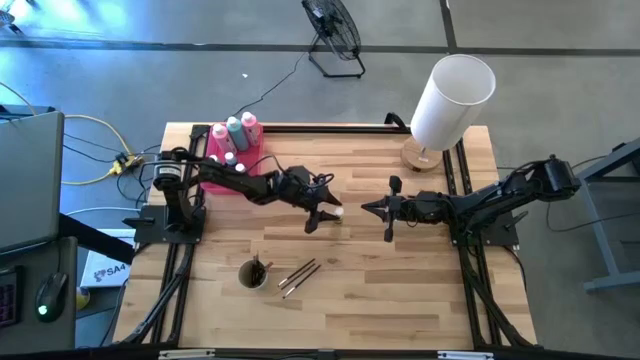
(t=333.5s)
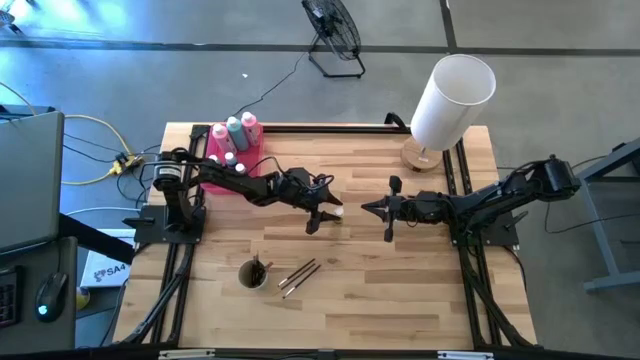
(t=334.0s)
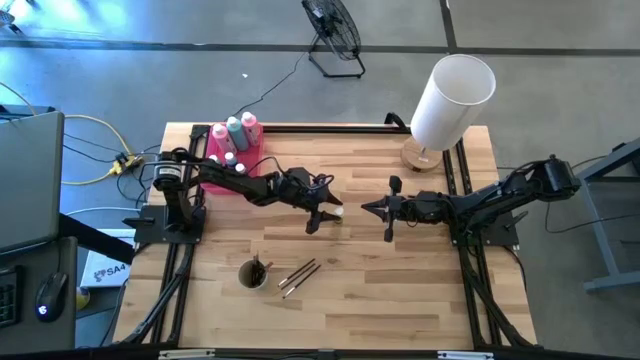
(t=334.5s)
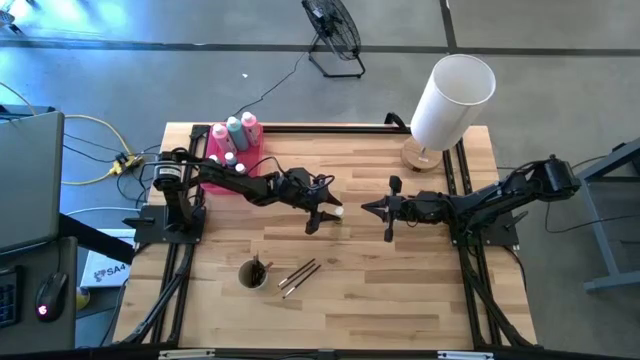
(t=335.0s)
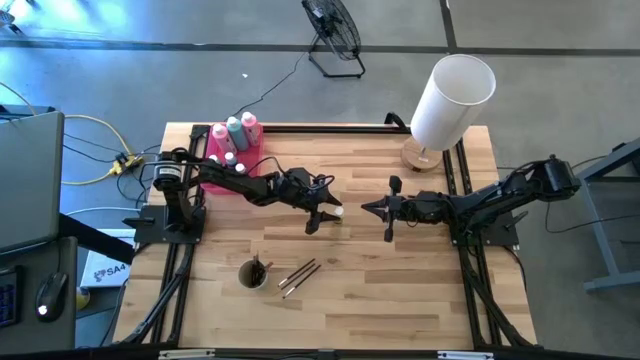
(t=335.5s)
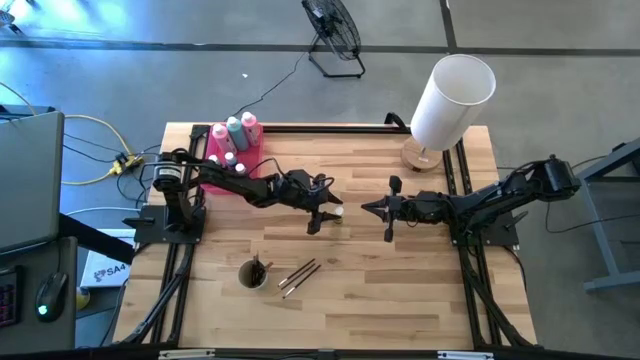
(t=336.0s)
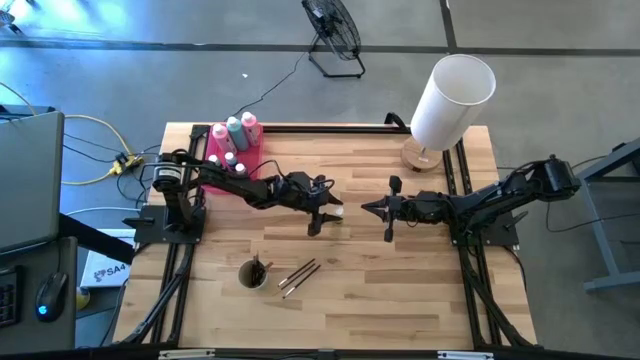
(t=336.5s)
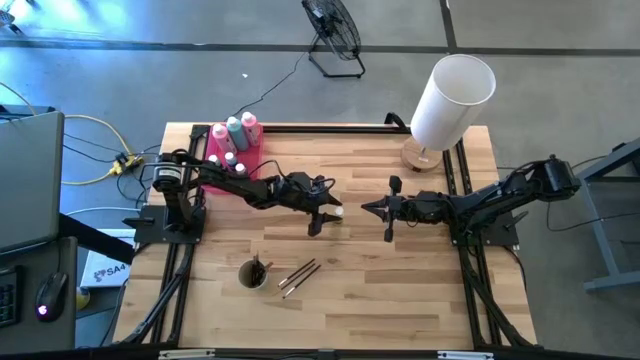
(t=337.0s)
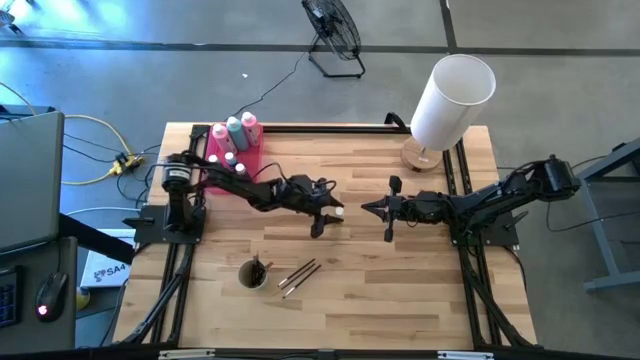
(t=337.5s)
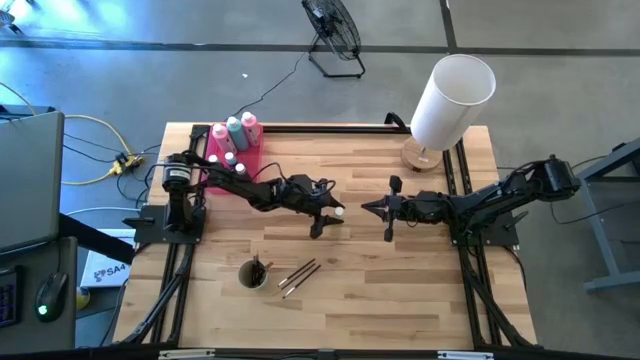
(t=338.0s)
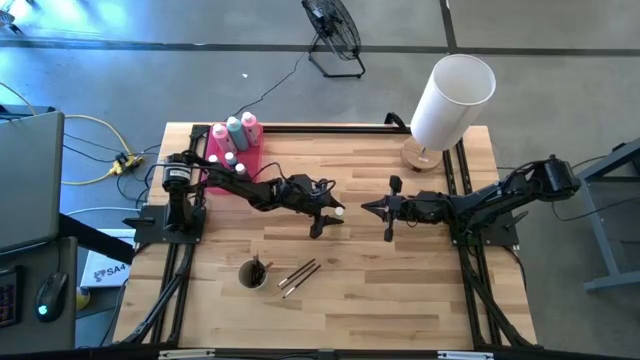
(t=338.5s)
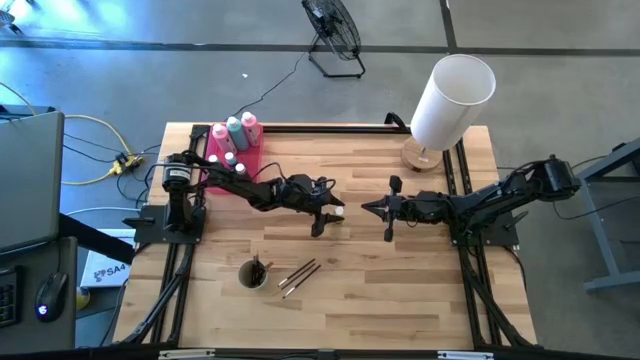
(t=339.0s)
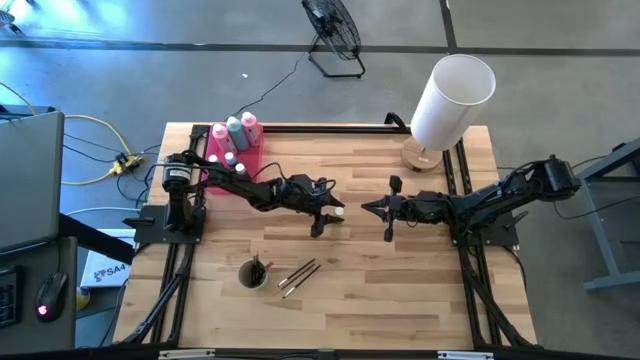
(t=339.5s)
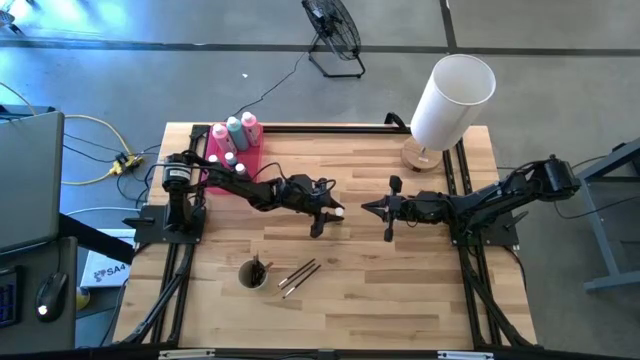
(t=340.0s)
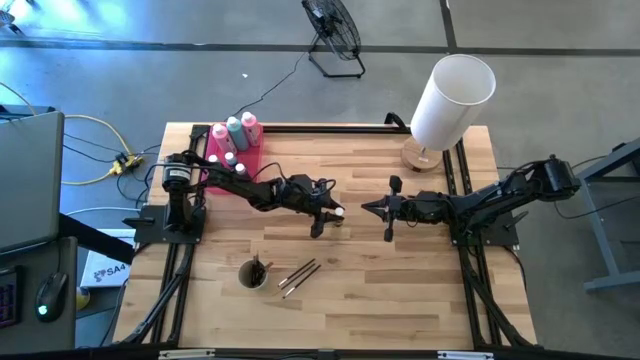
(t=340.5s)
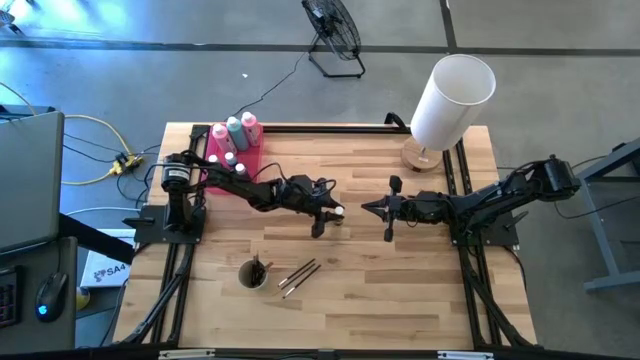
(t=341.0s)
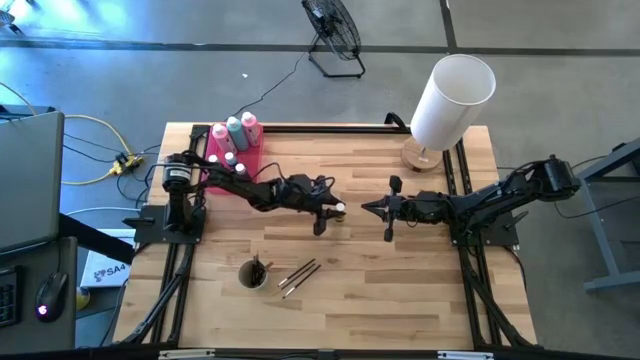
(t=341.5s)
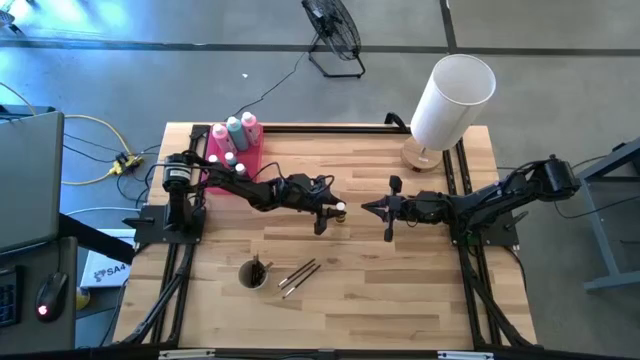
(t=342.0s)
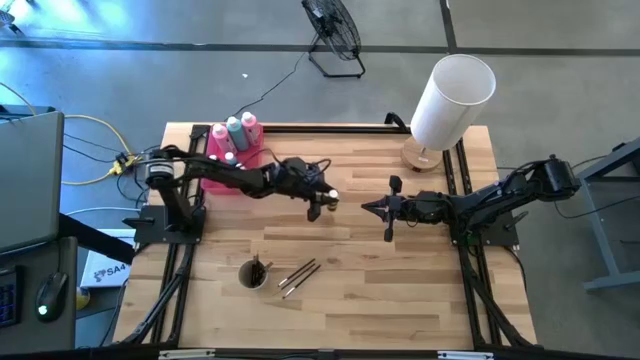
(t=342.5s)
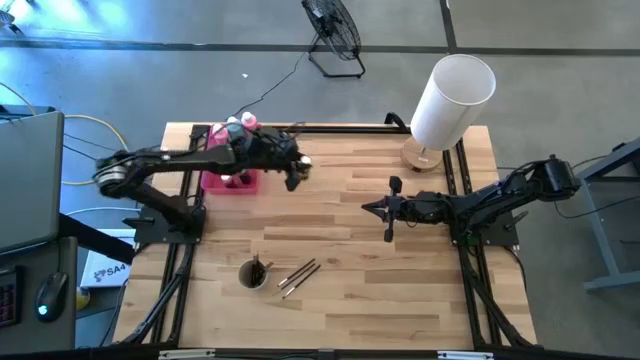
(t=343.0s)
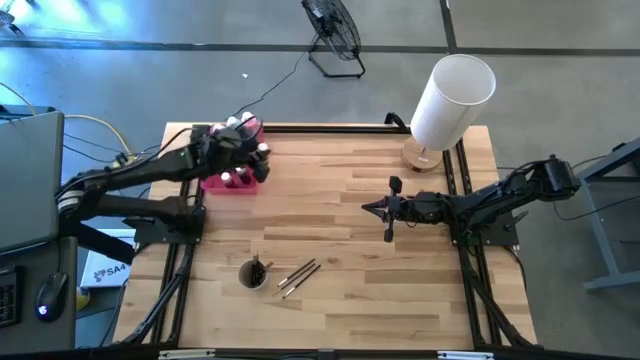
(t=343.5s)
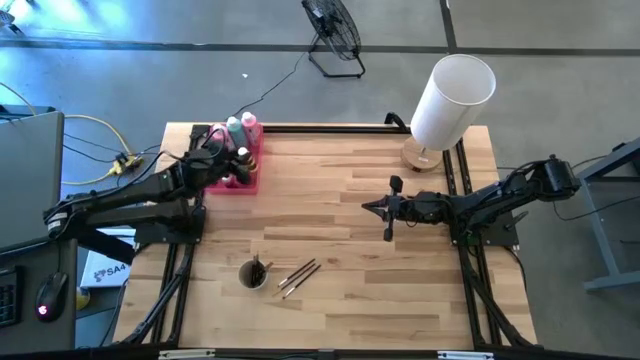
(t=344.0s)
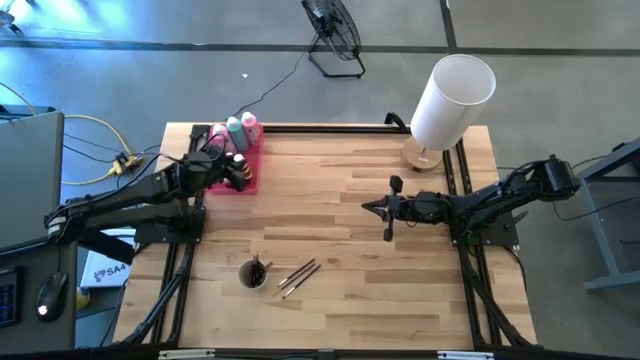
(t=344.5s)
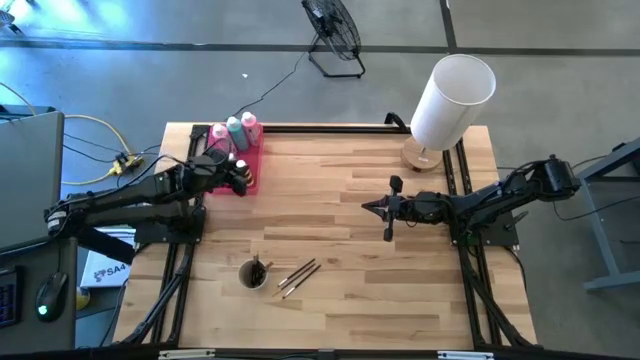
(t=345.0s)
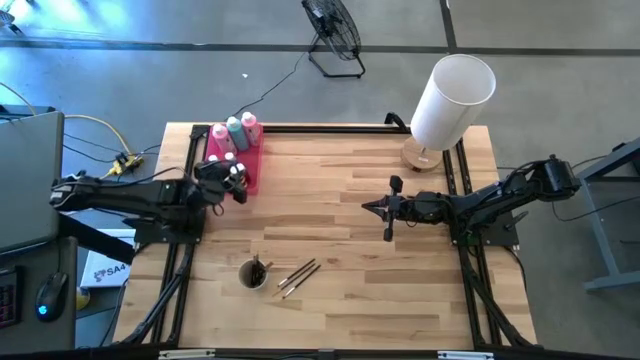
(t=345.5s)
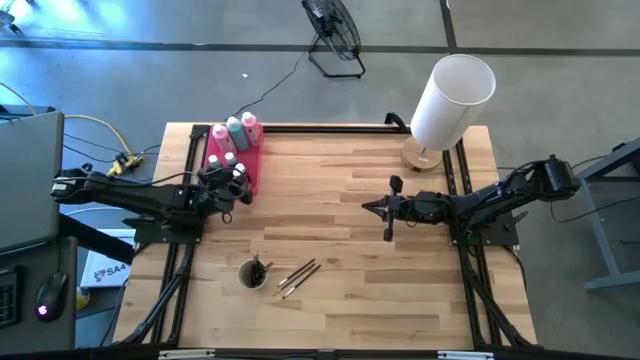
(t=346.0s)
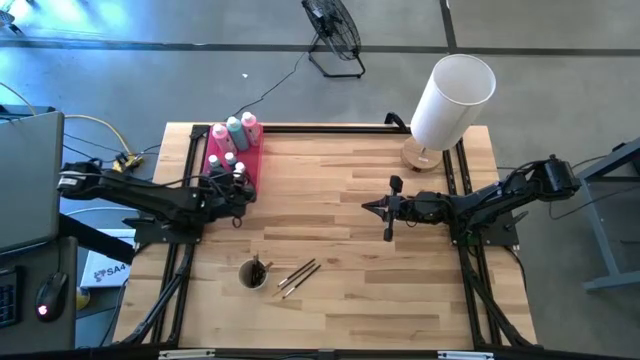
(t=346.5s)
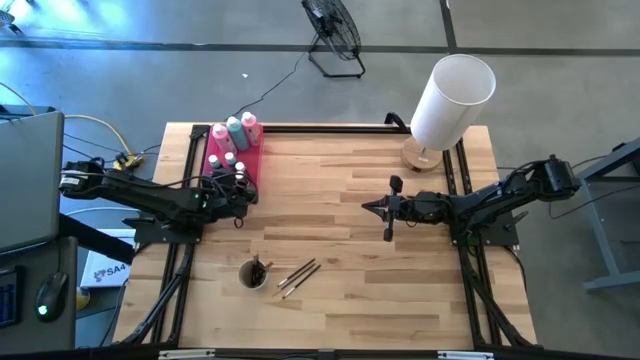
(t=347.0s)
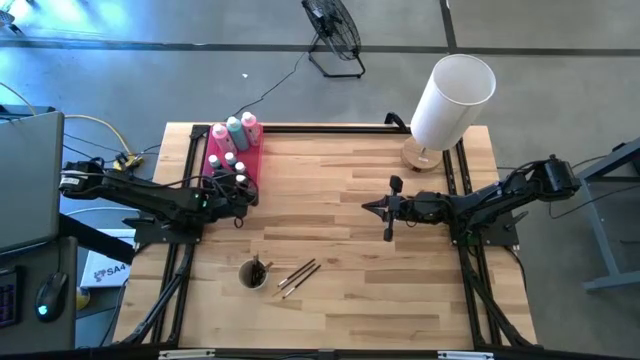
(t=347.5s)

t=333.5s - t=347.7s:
Task: Pick & Place Paint Supplies
Put the small yellow paint bottle into the pink bin
